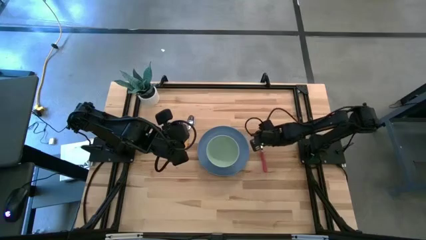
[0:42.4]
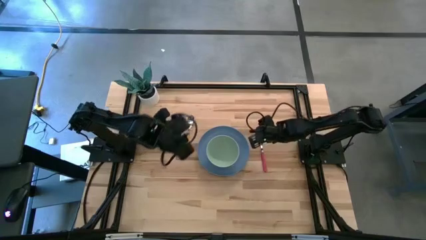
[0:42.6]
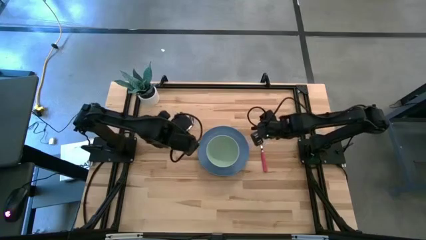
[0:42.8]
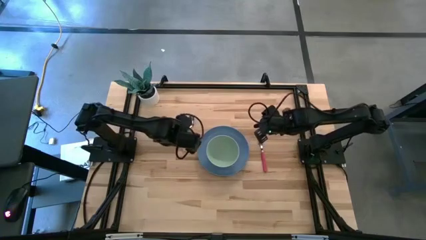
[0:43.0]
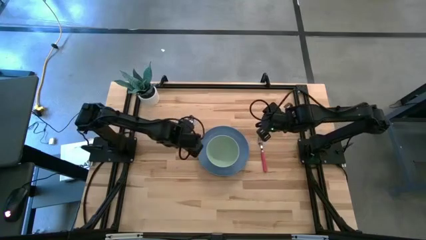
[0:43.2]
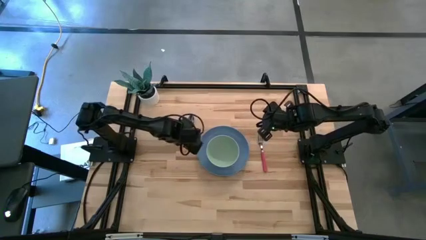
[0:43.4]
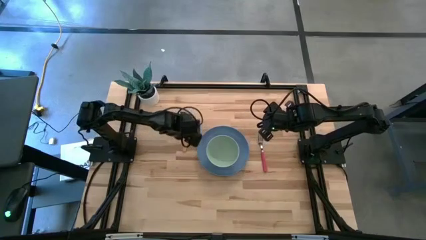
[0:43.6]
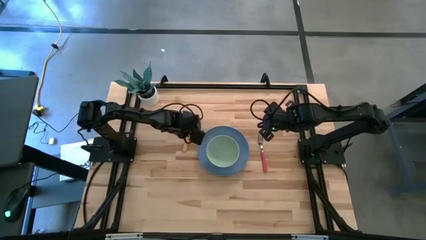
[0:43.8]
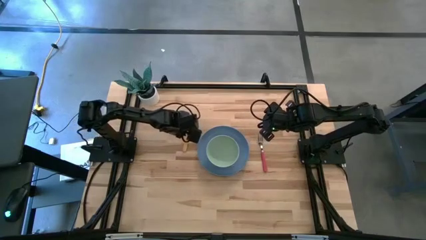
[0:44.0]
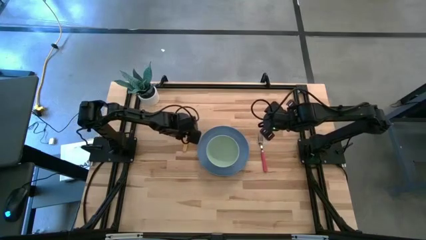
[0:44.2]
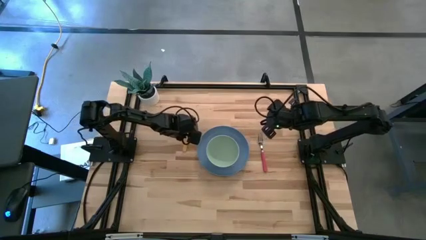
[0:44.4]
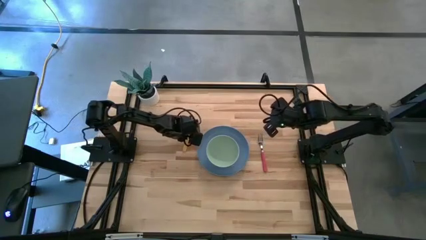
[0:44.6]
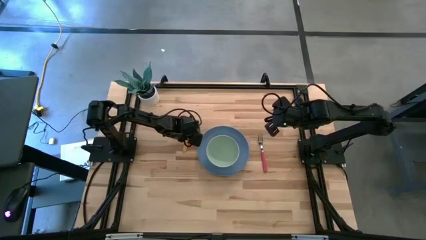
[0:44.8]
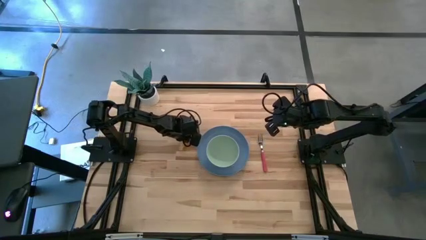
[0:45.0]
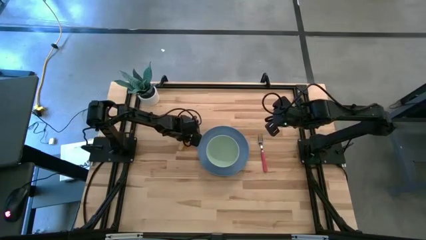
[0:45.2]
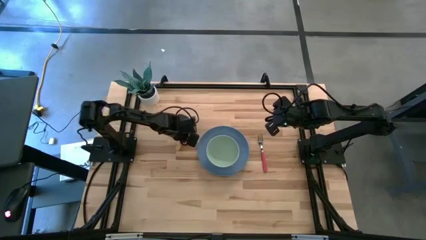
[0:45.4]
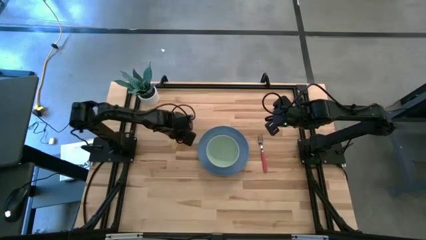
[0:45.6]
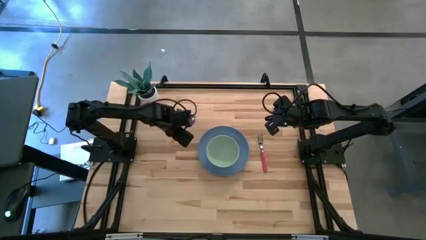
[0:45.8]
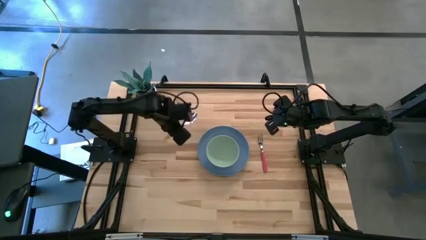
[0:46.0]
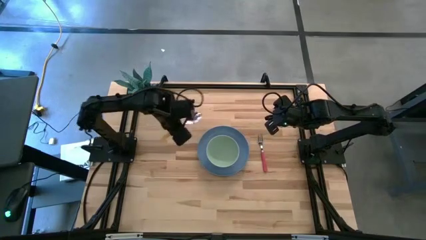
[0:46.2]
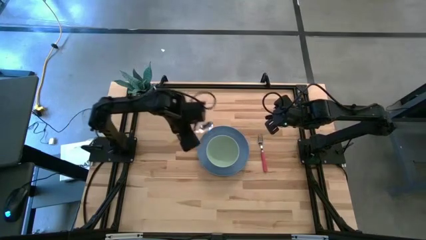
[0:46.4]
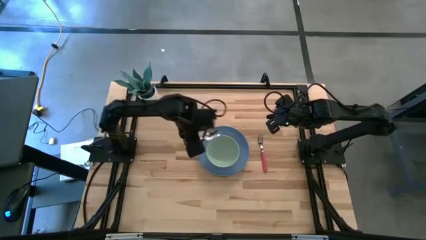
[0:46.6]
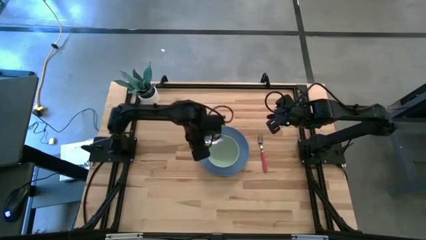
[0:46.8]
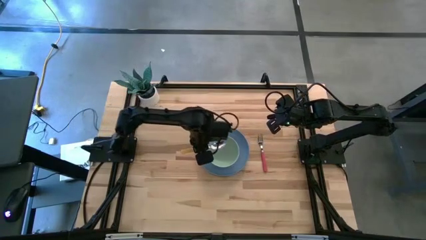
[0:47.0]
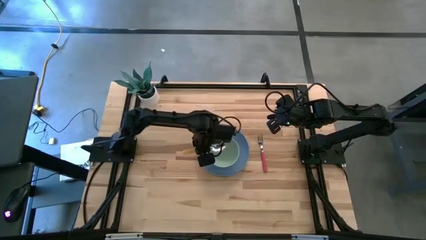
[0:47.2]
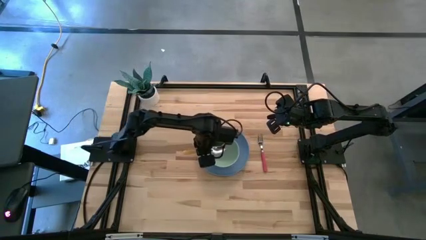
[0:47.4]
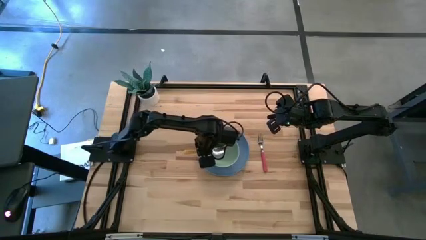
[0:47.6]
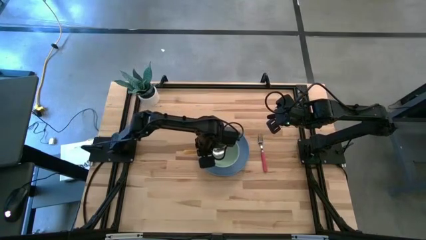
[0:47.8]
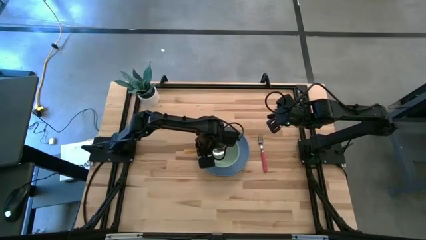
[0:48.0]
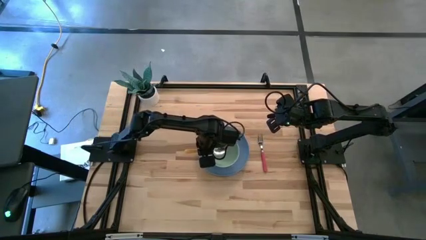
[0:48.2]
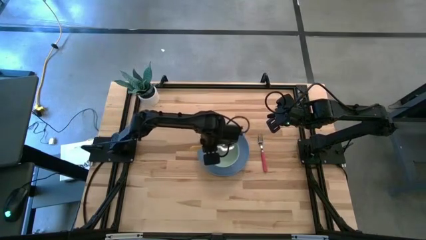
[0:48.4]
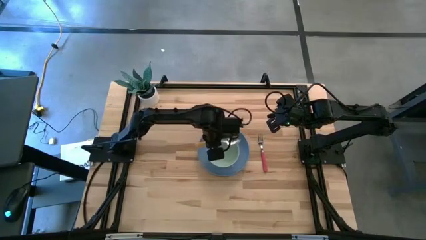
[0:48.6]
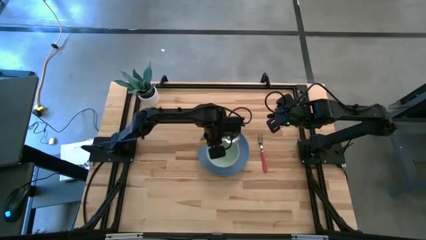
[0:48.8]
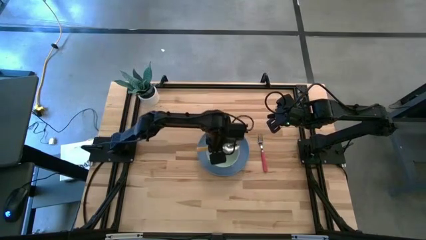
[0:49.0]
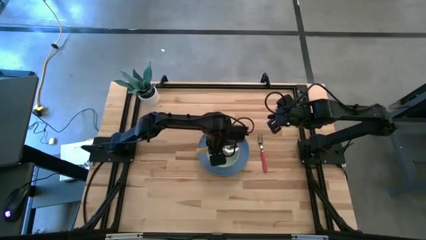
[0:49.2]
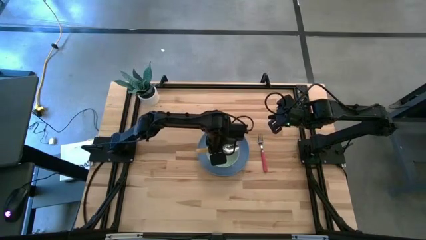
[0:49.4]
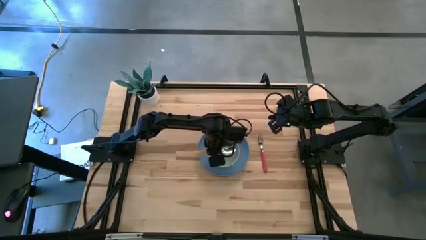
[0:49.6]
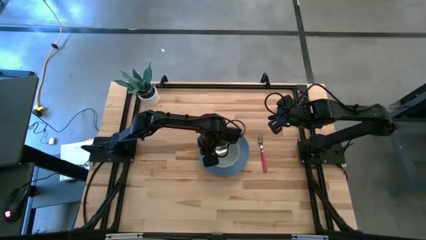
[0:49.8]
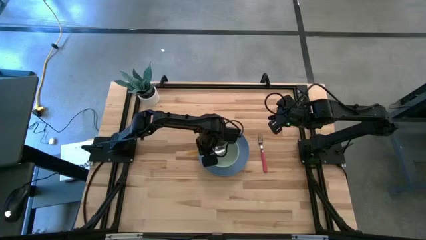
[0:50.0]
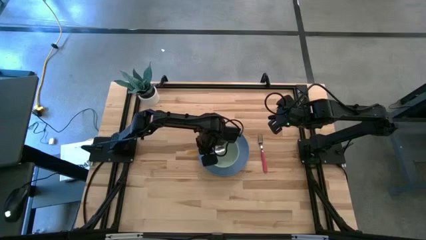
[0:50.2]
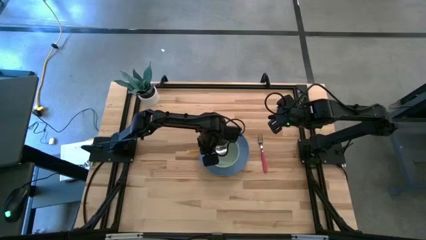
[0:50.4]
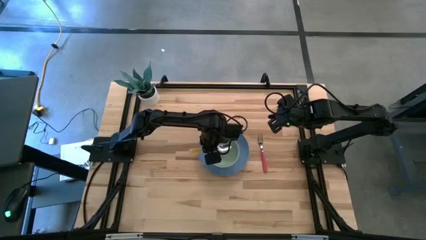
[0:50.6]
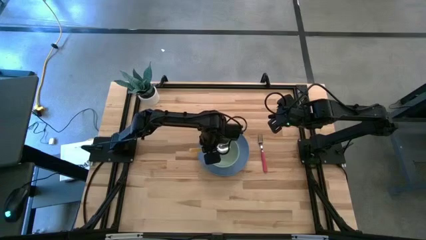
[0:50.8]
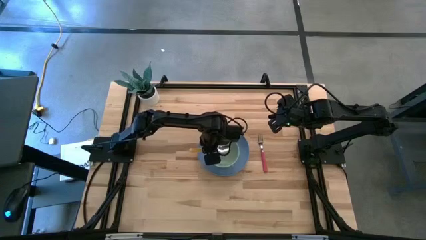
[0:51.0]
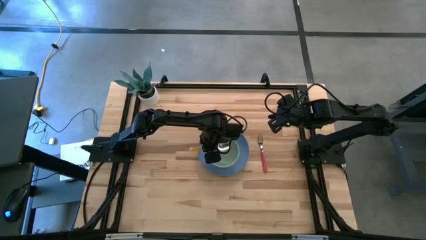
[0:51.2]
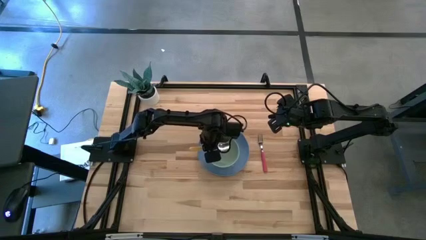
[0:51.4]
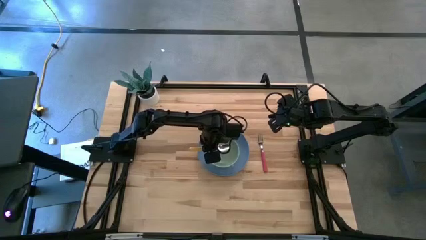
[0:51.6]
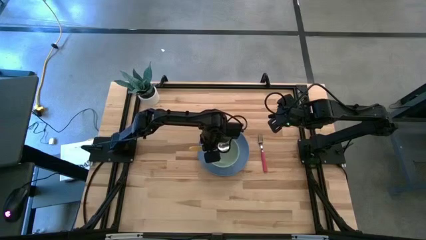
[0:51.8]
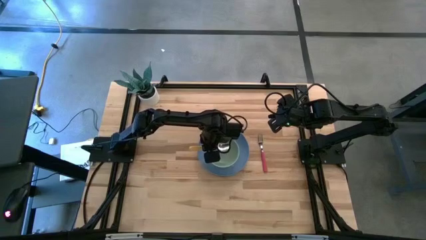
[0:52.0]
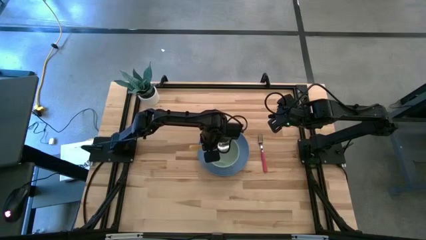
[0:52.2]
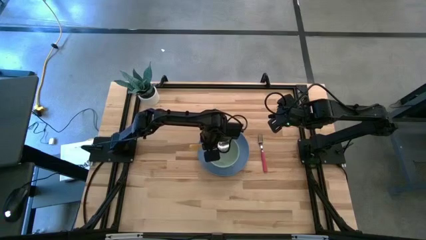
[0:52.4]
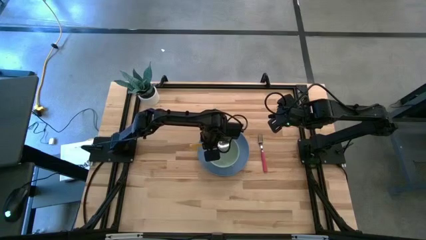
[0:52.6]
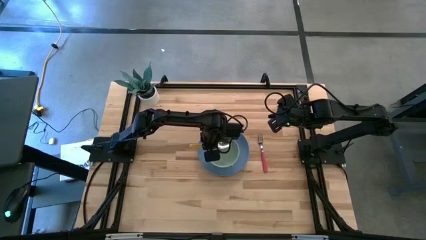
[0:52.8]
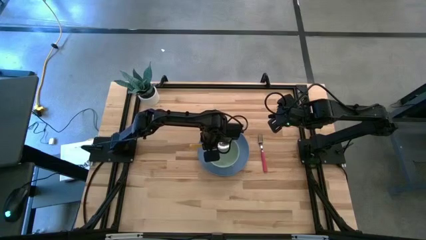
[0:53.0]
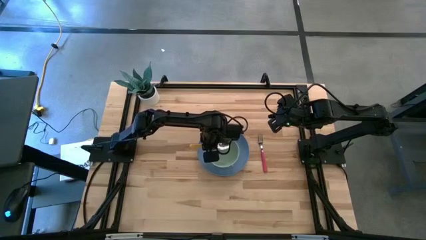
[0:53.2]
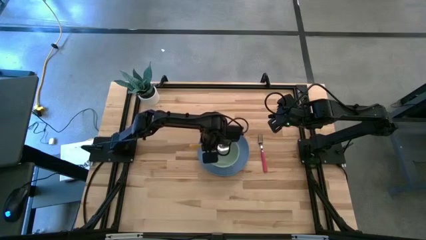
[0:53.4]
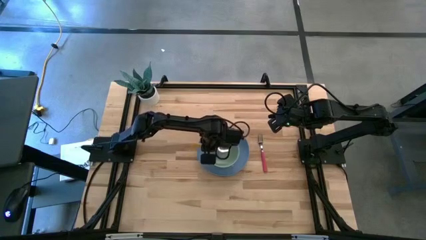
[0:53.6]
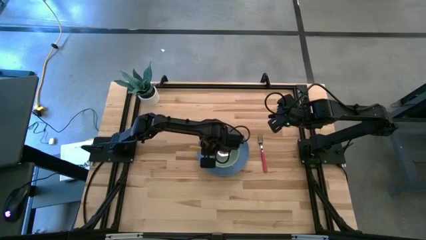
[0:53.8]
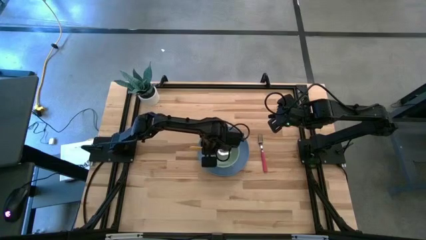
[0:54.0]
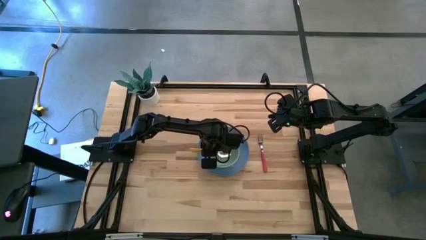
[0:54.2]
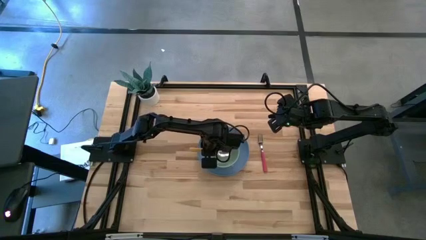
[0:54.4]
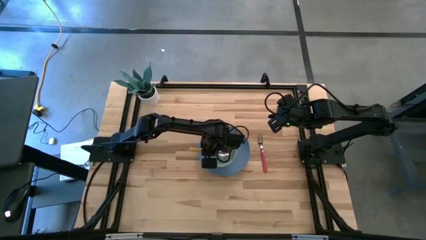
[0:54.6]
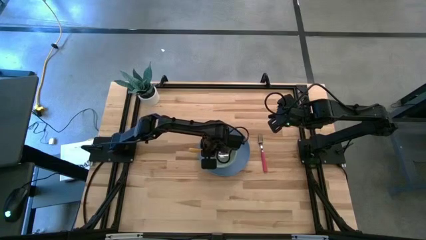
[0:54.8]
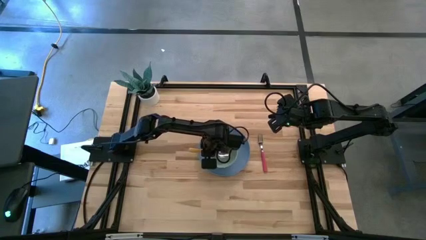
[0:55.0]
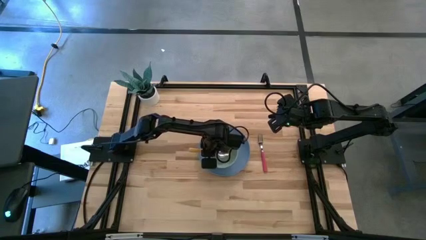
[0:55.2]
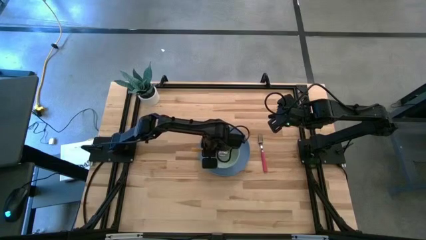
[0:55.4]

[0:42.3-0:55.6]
Task: Set table place
Put the yellow spoon into the green bowl

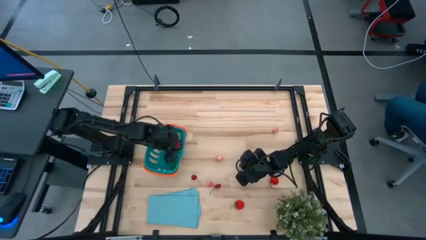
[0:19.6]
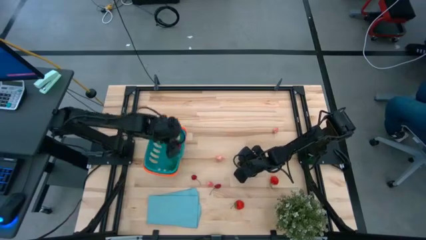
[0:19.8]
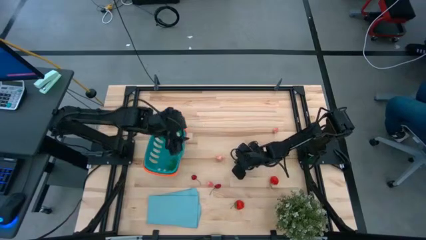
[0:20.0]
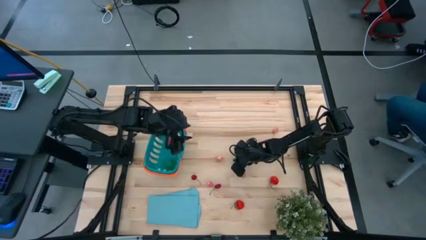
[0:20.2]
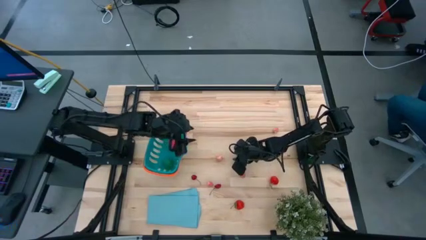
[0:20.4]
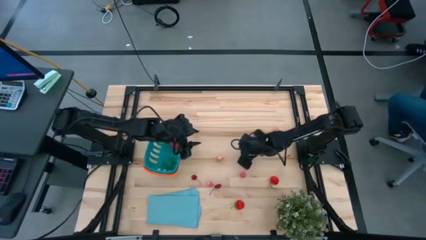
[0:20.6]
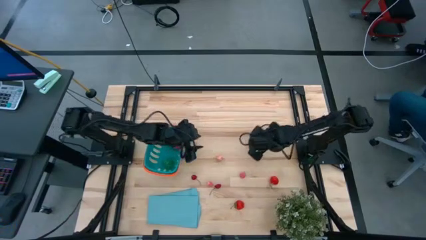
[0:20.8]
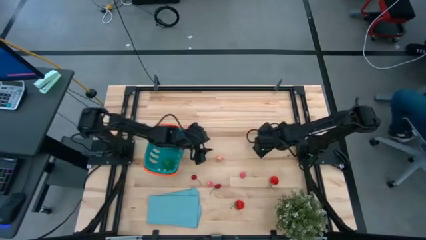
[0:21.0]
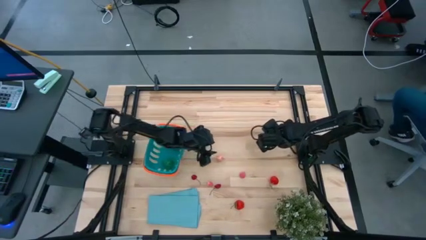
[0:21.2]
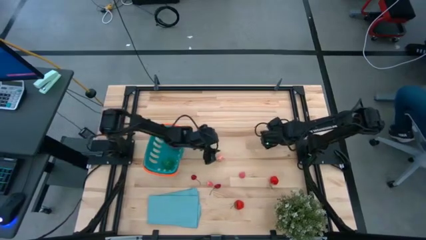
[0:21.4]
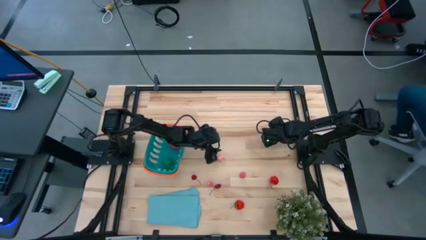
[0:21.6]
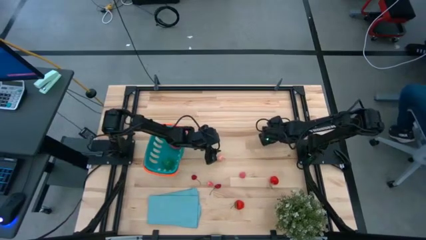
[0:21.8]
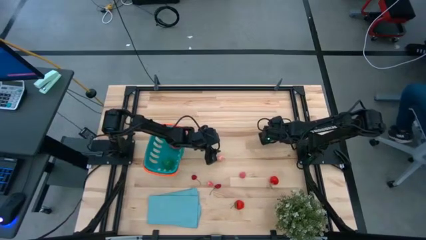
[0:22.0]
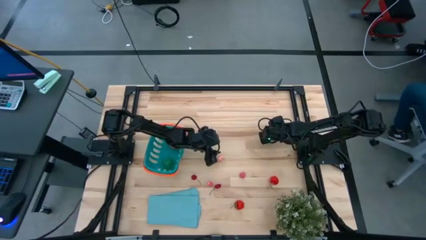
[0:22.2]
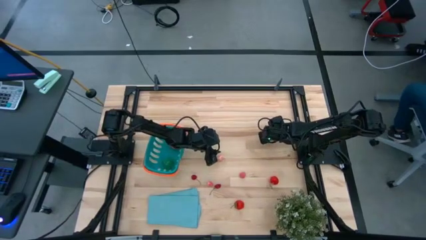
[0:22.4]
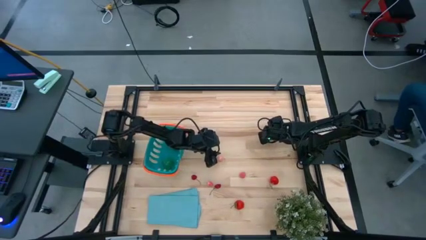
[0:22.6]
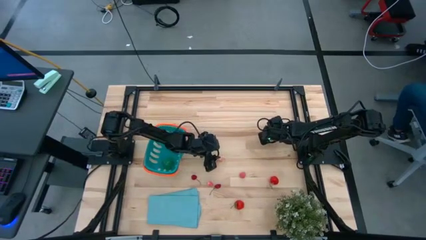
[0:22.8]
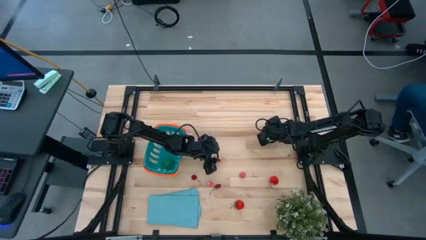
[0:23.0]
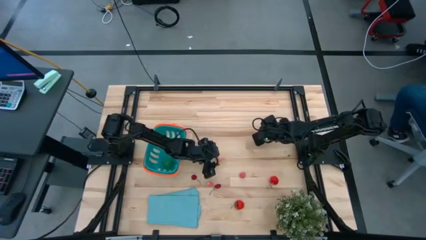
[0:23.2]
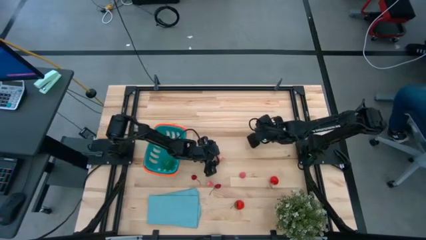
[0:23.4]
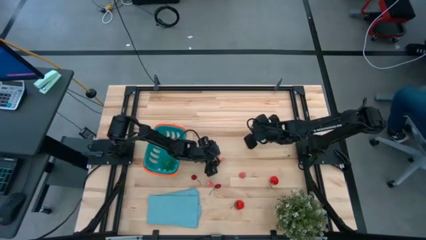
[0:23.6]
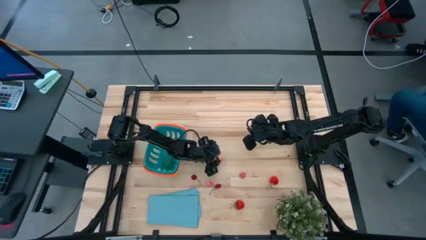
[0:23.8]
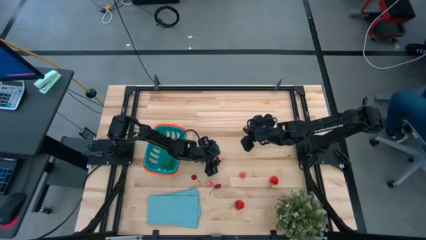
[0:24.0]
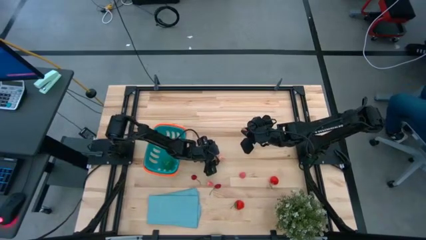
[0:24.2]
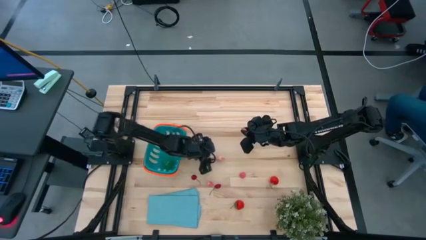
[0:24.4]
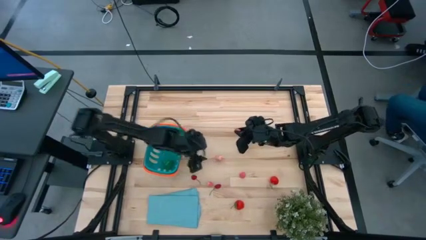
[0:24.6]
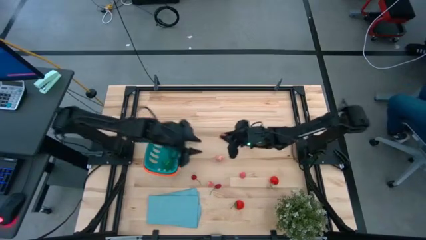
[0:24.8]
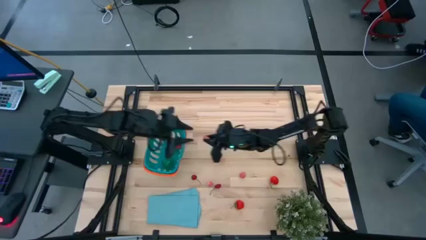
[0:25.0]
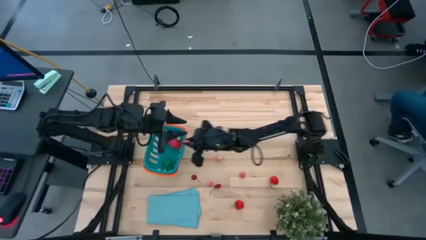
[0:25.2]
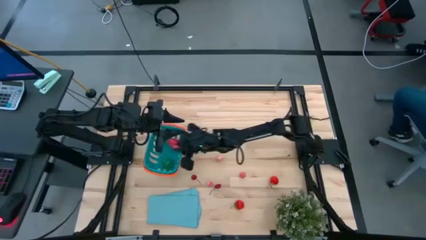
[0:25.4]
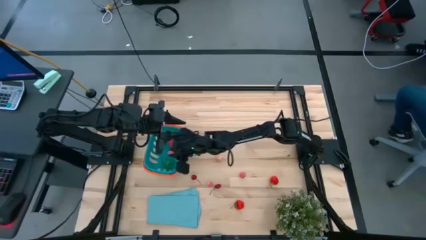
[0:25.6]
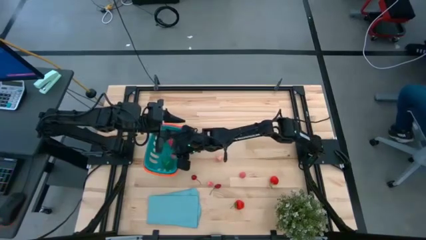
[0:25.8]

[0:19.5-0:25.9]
Task: Pick and placing Produce into tupperware
Put the pink apricot into the blue basket
